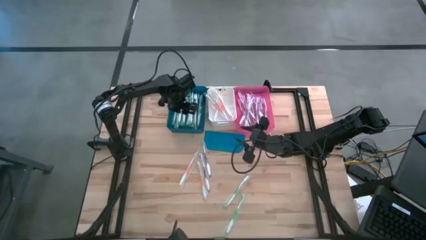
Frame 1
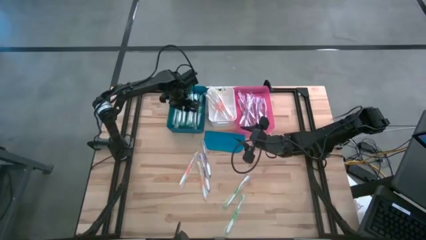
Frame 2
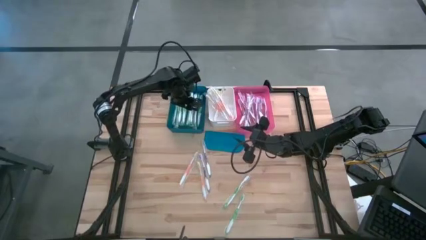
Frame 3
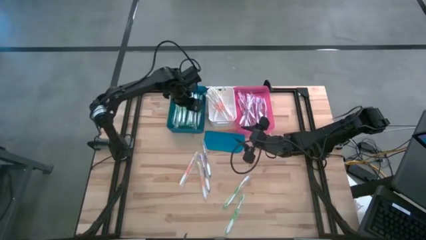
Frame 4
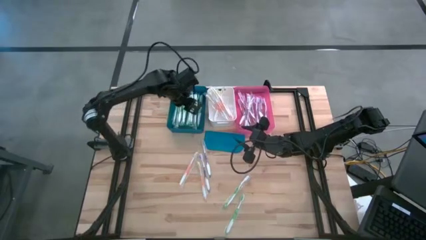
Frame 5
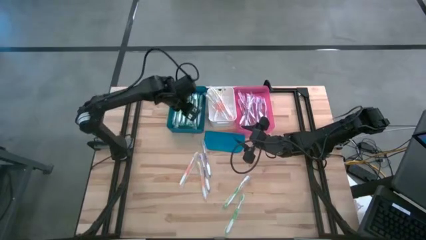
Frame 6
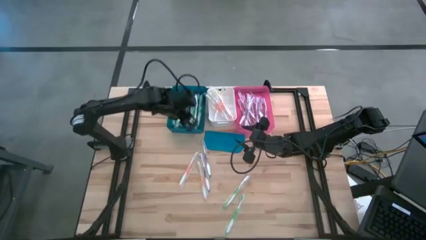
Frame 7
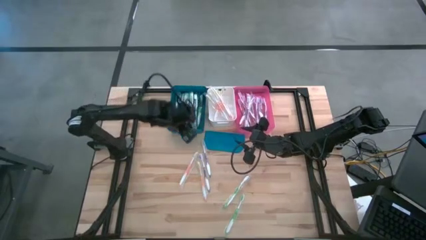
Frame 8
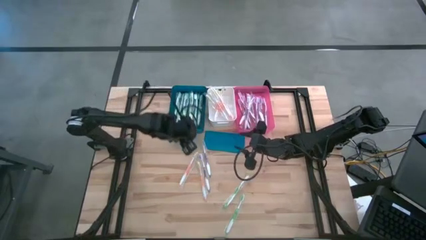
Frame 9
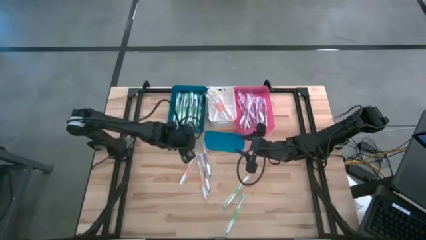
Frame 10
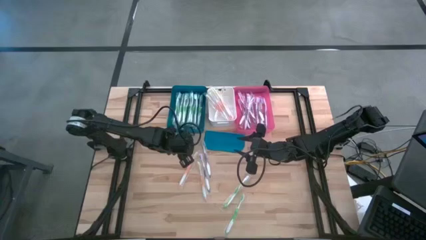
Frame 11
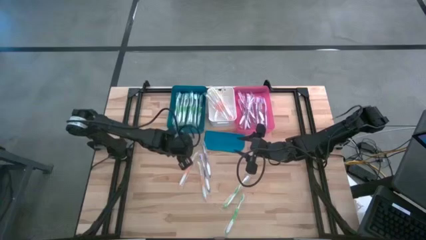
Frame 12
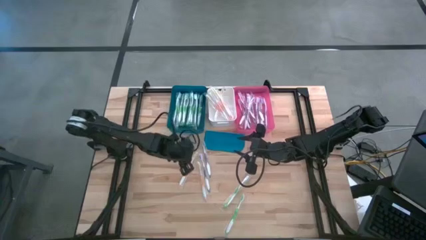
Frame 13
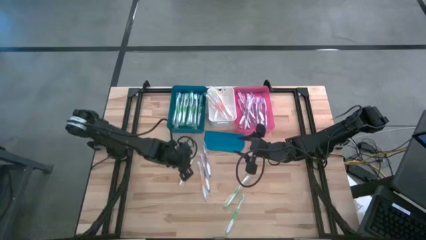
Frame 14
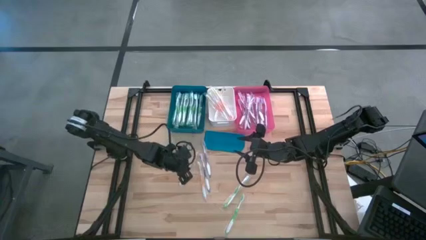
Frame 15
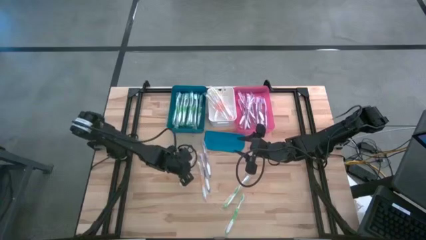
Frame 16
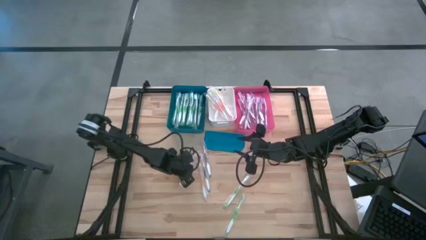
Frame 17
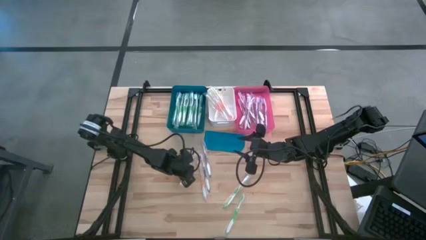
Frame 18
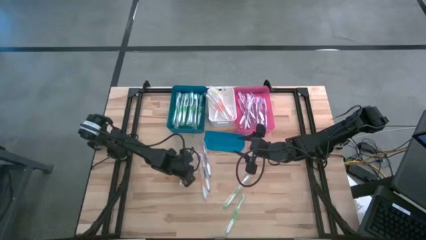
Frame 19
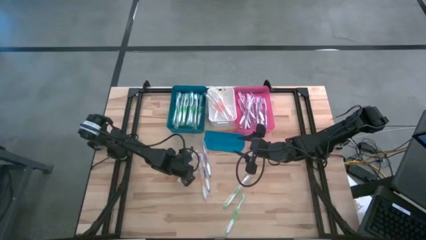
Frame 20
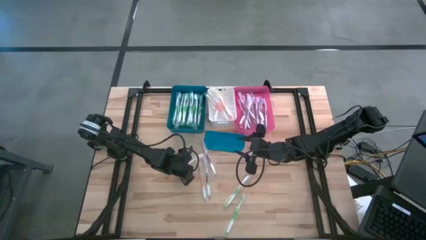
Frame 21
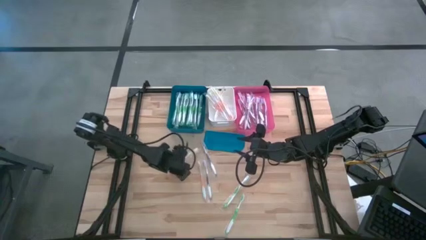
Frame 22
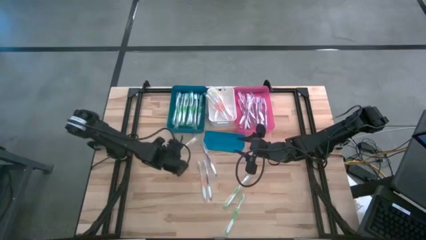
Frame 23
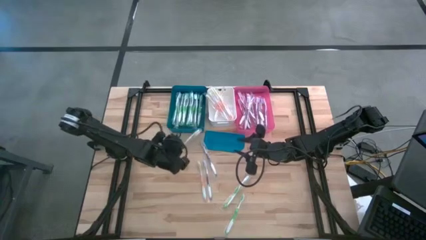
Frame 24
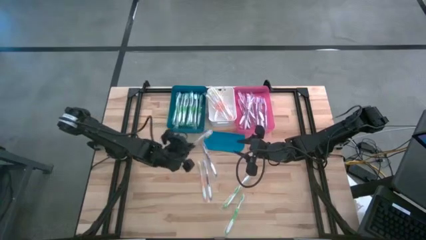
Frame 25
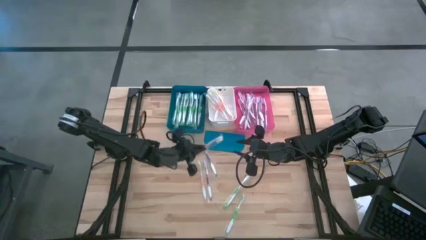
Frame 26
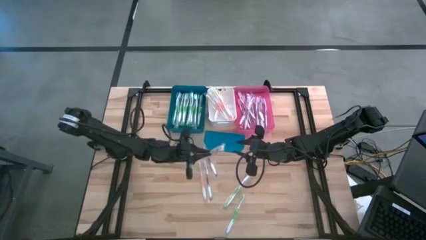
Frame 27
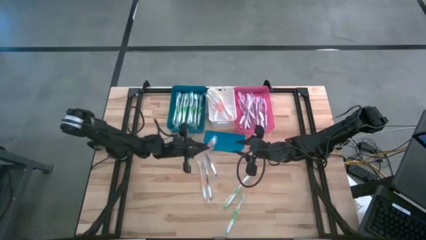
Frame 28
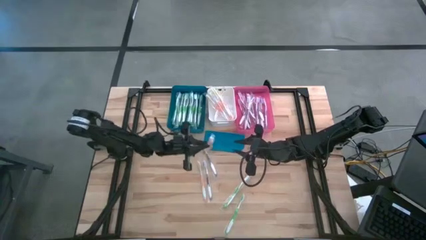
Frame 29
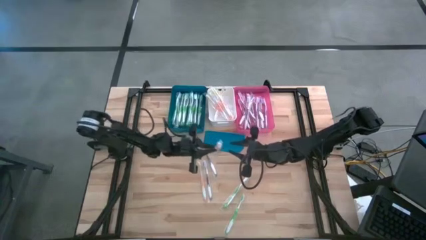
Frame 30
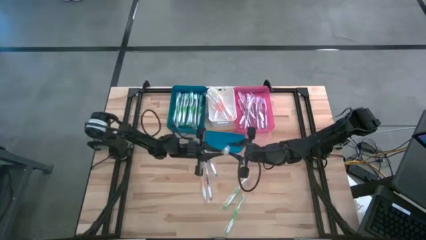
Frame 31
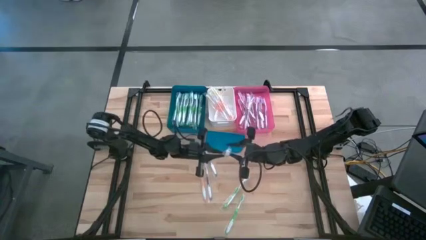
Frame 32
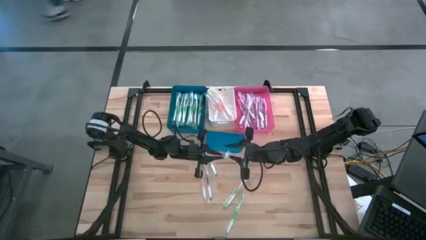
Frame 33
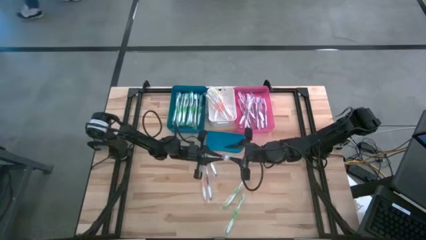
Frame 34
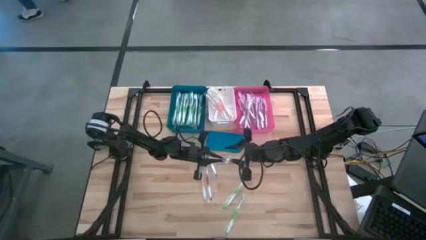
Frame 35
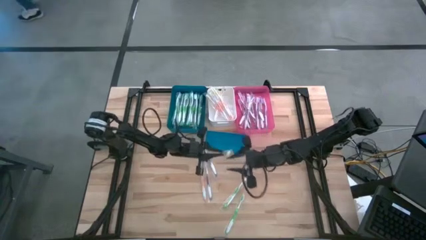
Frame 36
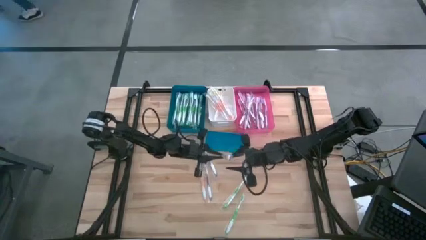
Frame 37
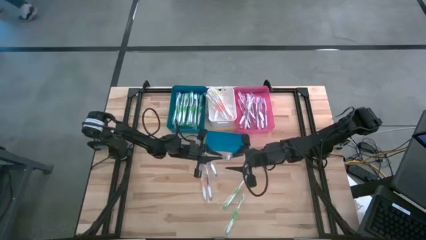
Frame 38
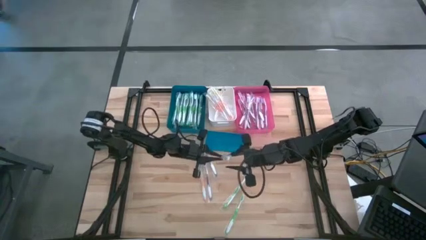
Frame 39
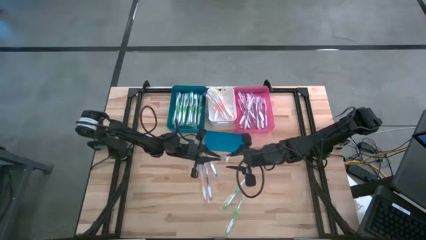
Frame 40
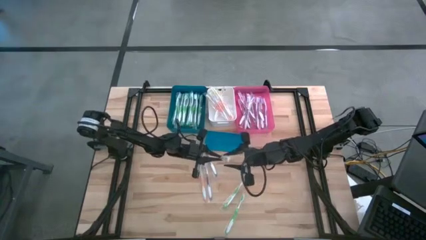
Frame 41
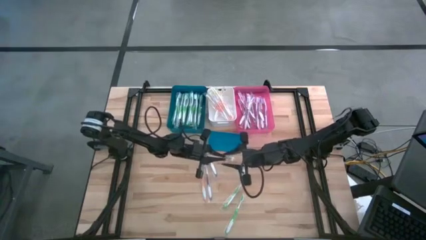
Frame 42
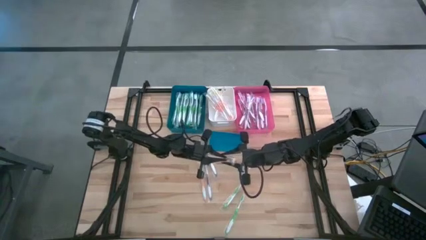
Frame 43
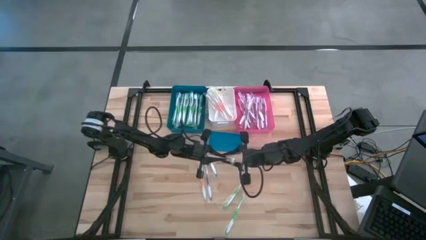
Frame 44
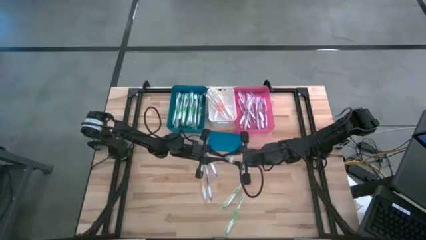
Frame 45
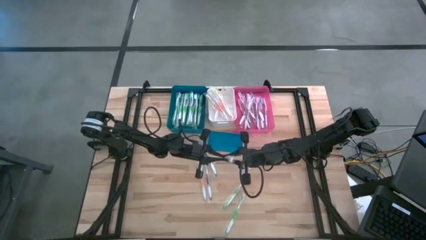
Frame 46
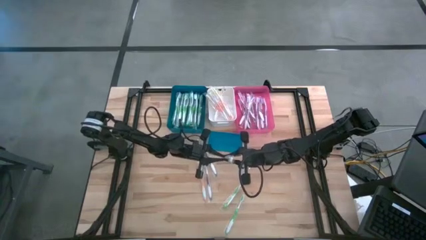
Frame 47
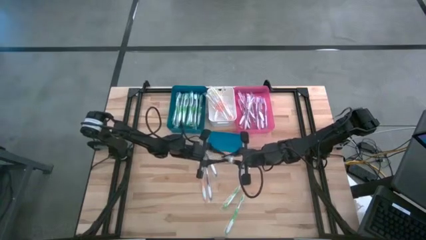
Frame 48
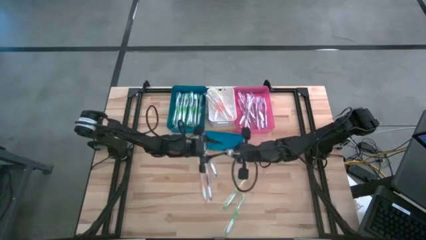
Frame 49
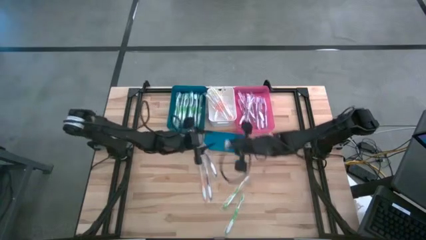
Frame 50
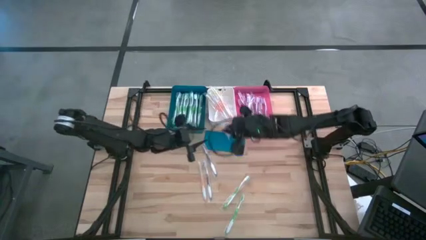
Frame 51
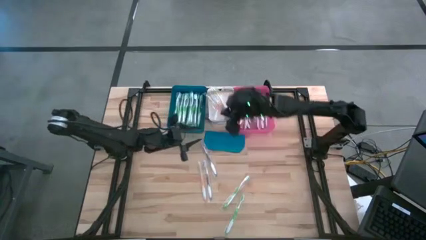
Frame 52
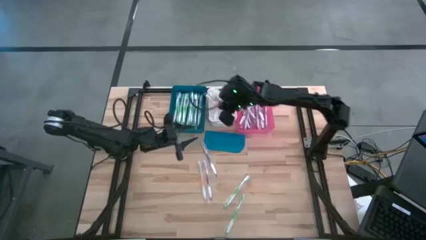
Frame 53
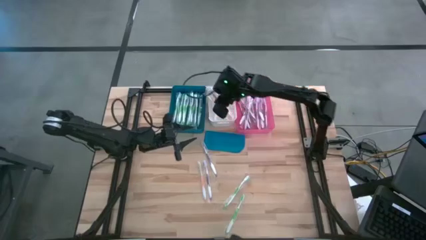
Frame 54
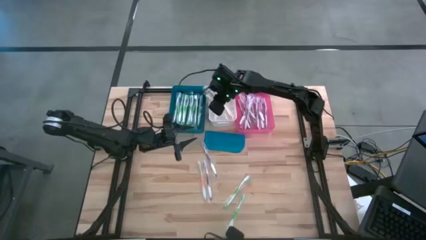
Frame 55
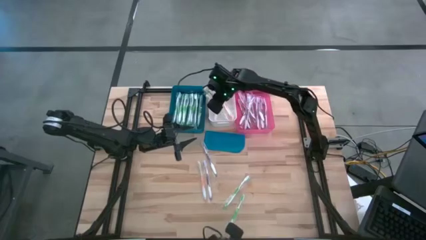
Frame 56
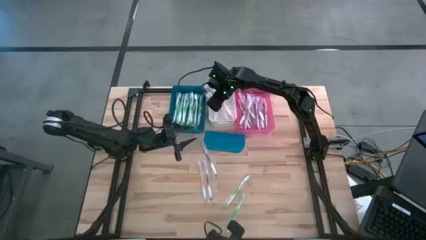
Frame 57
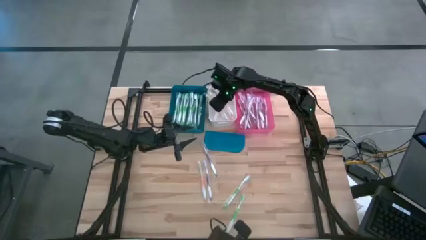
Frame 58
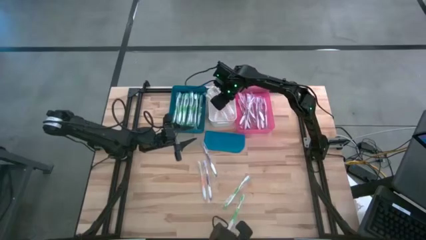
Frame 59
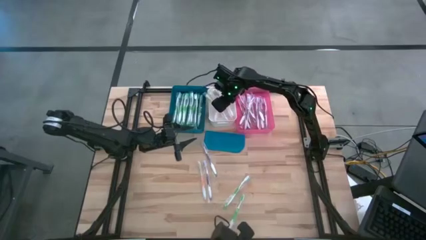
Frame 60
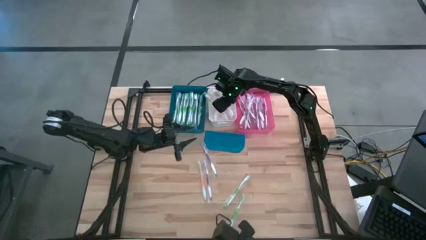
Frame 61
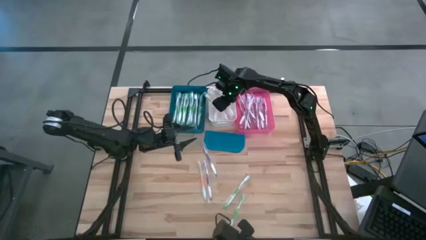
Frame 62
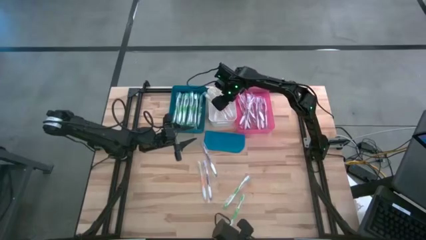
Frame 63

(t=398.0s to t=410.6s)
Task: Pick & Place Toothbrushes
Put the left orange toothbrush into the white bin
